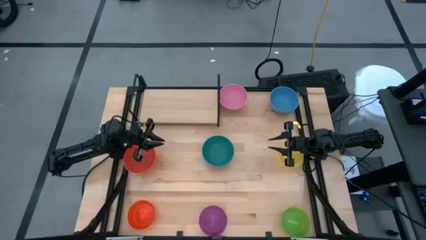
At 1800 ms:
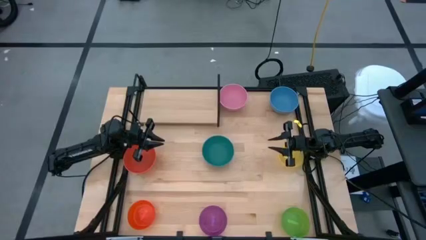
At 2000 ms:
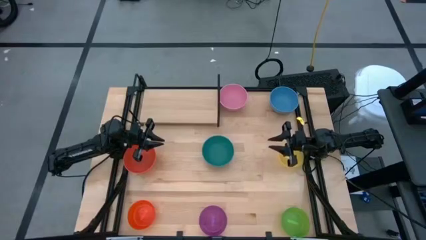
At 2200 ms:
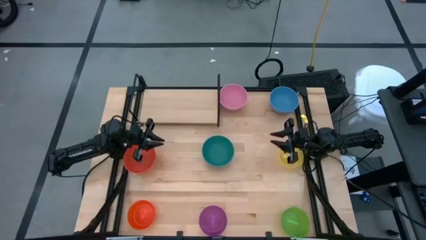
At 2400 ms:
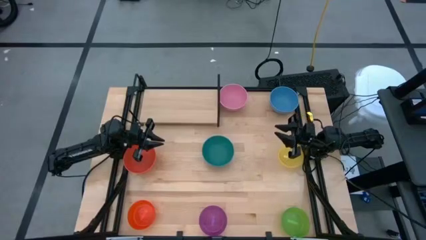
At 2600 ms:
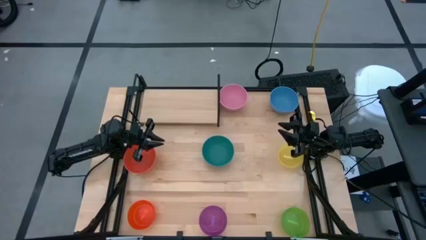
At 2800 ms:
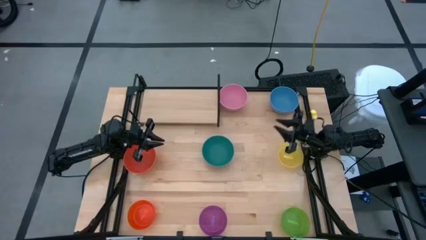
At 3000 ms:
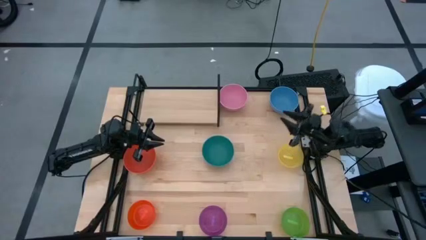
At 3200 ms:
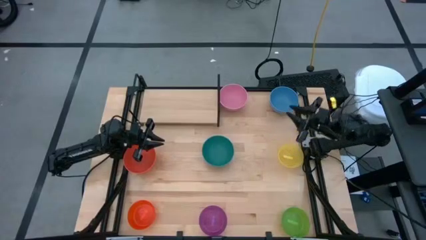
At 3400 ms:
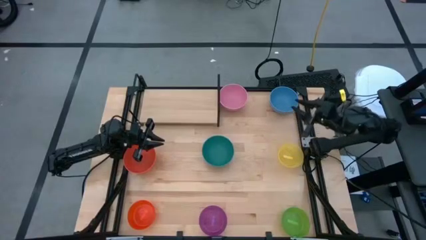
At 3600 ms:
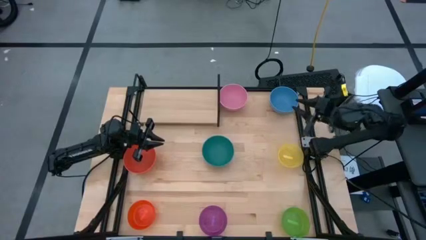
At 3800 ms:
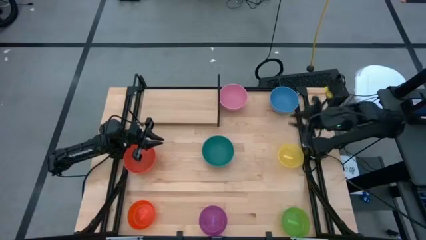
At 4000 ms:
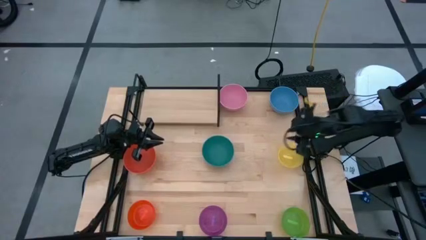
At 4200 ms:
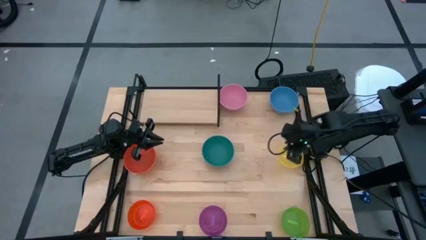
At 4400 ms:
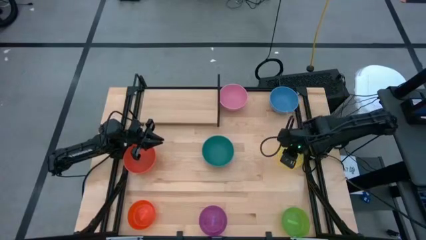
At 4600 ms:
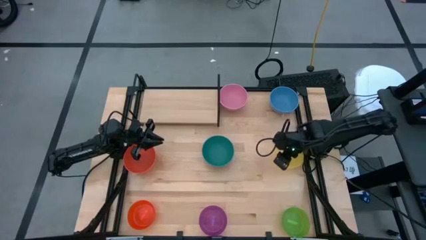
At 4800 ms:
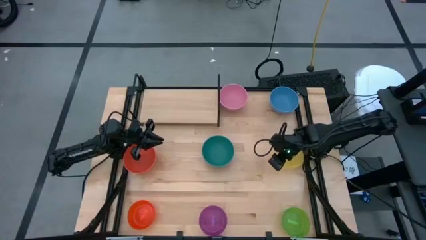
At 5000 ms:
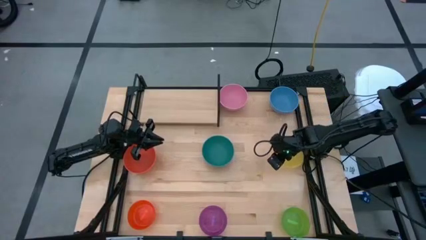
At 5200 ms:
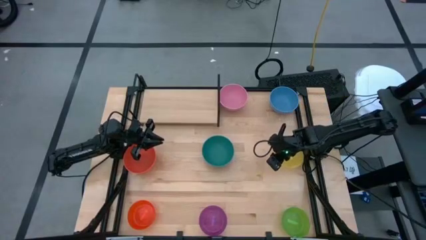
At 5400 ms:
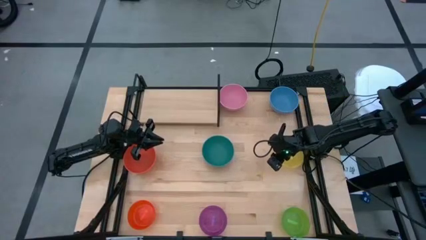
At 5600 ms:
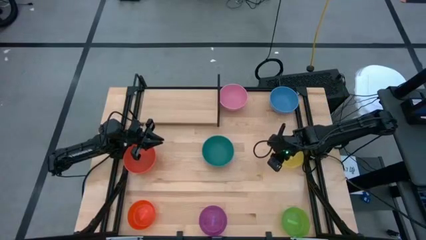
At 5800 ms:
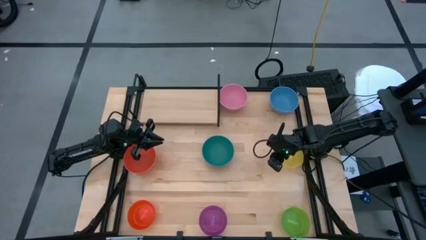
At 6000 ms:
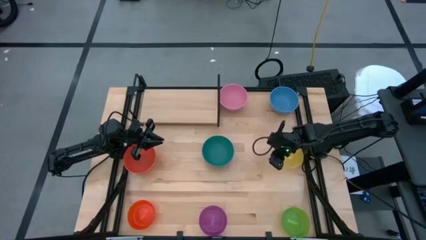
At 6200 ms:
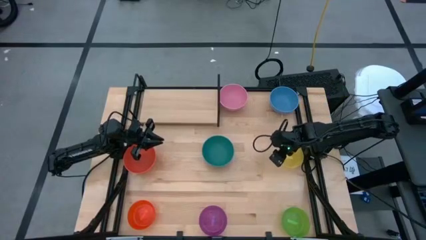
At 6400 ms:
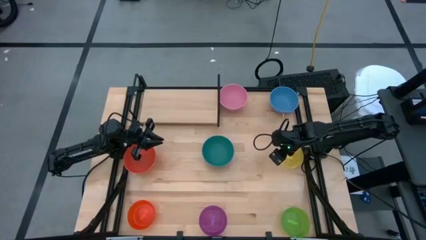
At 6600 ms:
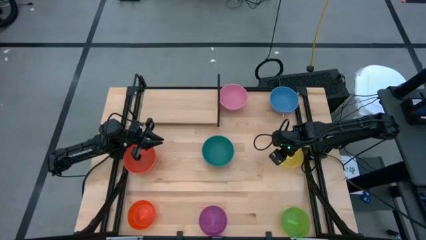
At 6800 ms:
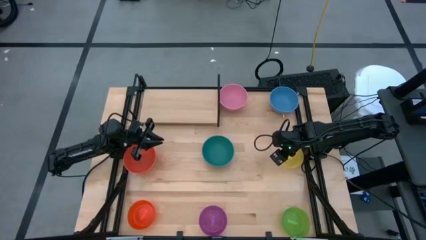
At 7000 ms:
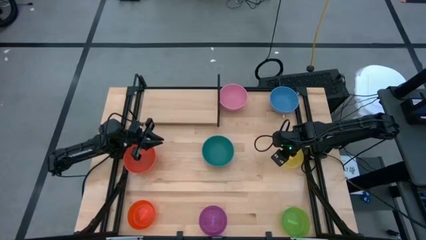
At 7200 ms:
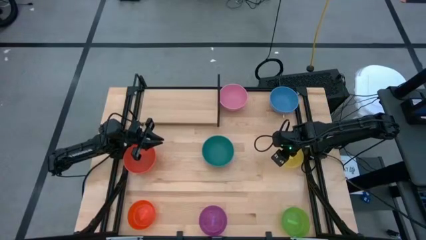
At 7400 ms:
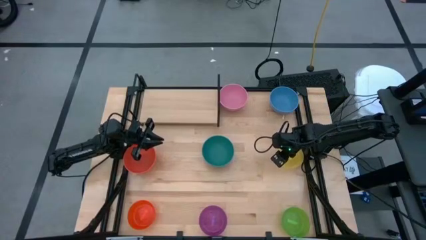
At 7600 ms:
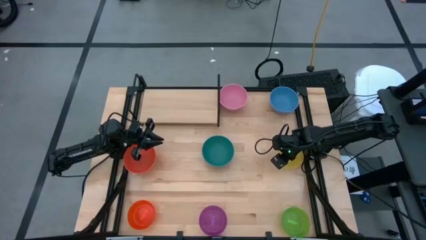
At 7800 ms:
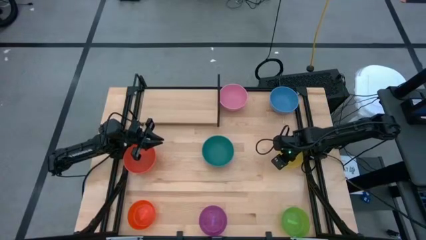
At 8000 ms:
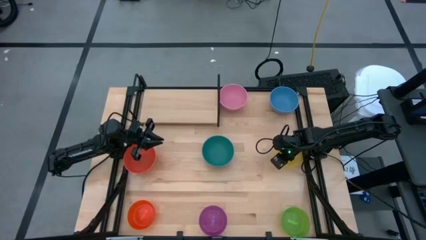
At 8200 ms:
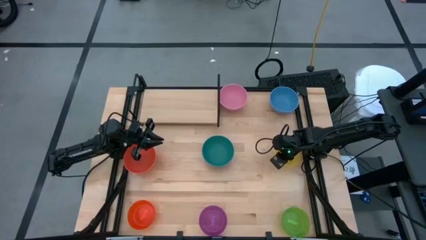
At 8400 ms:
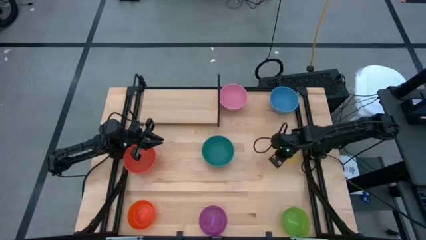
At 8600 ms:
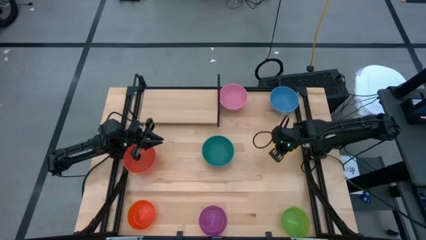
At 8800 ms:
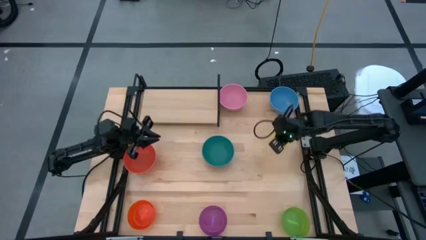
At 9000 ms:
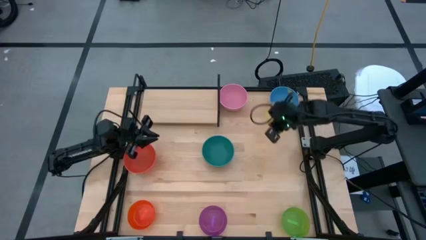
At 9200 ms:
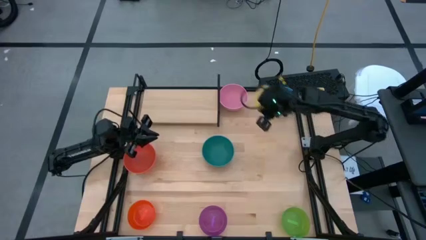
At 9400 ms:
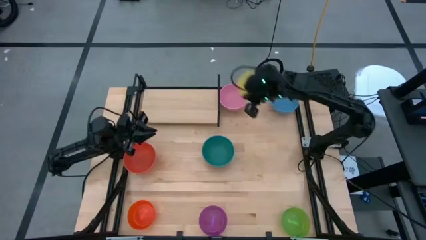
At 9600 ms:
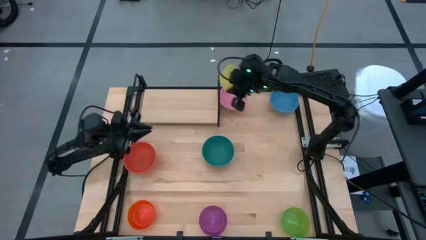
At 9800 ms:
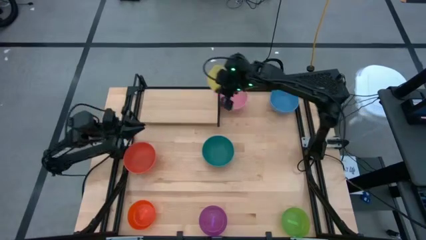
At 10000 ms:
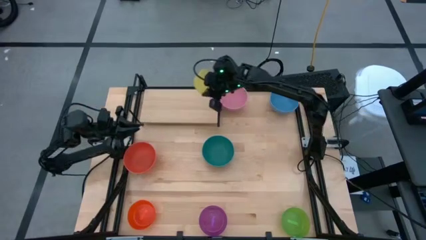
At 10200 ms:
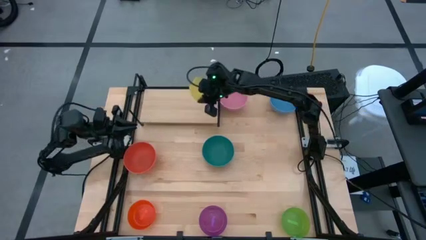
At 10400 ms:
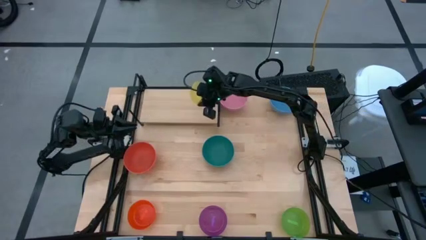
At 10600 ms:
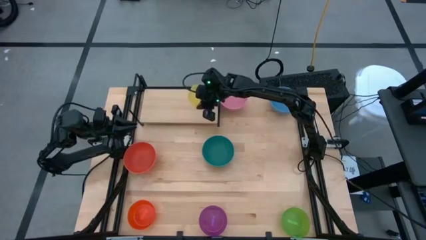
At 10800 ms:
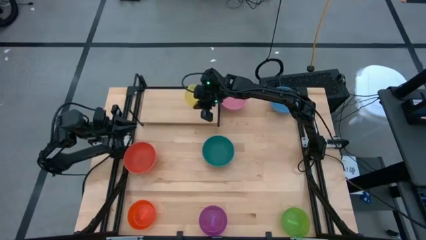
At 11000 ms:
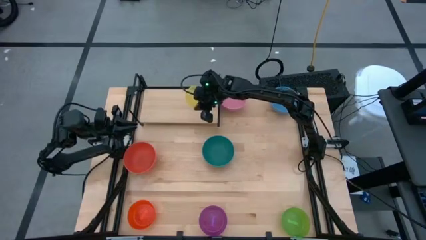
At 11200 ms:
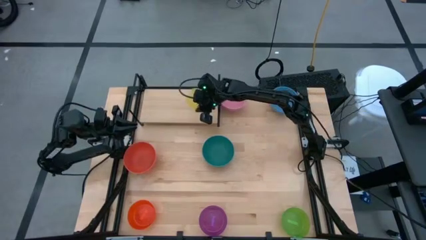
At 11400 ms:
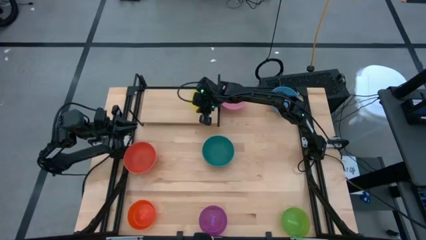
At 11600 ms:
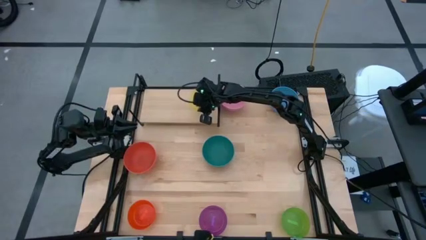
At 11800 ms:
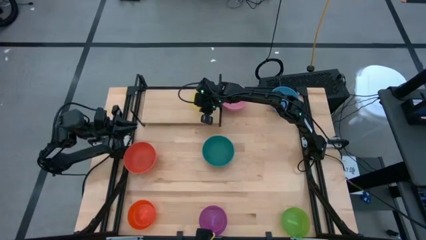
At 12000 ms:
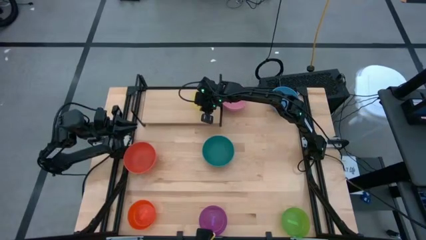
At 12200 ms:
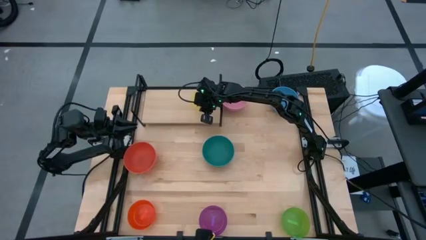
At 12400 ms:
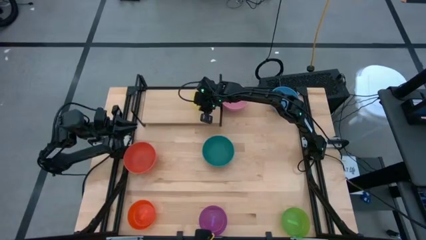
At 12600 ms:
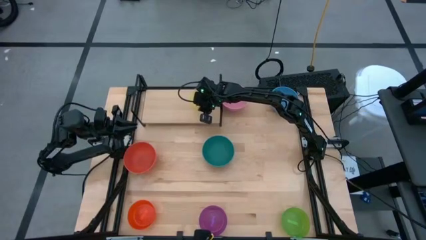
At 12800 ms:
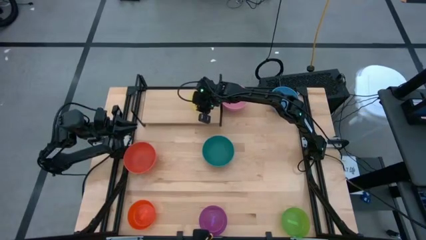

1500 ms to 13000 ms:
Task: Place and stack bowls onto a shelf
Put the transparent yellow bowl on the shelf

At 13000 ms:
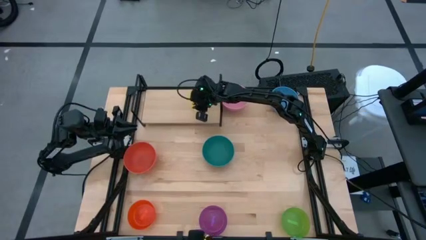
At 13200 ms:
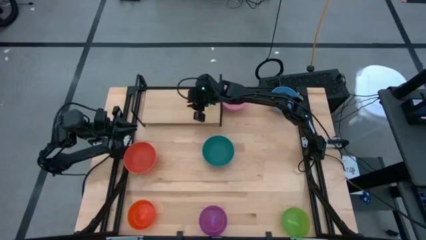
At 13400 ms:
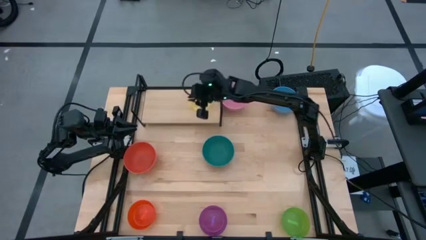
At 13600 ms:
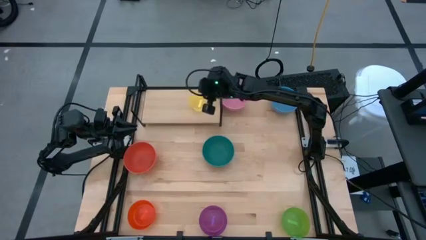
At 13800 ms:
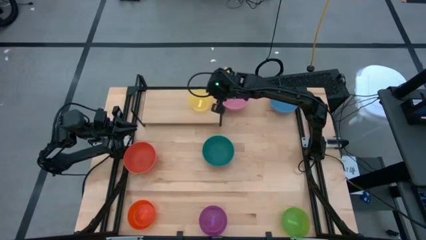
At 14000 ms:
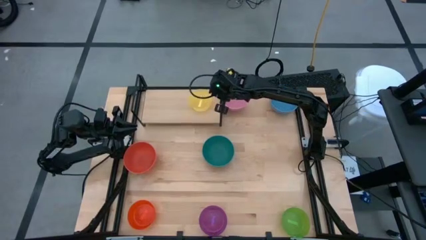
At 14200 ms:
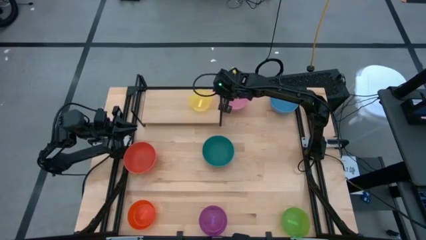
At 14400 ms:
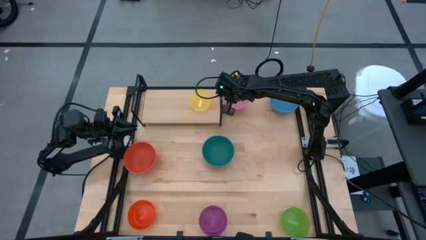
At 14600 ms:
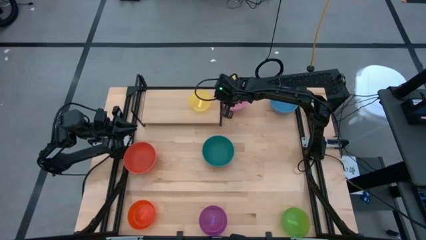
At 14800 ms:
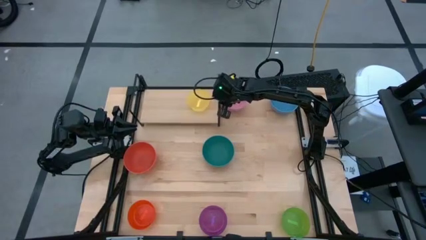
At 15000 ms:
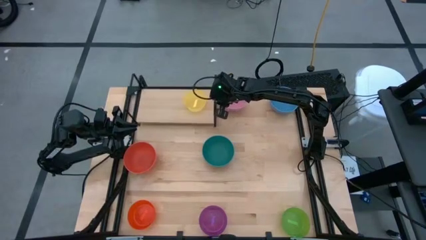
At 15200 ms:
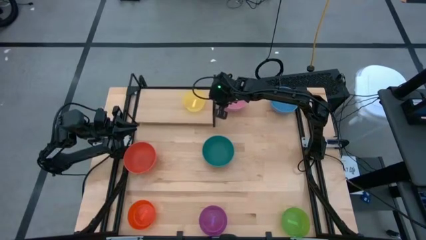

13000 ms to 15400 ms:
Adjust the shelf to the left
